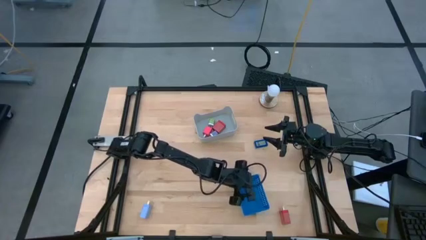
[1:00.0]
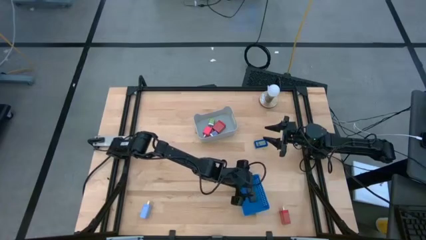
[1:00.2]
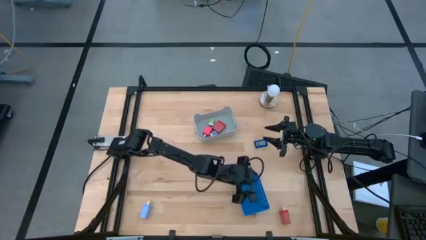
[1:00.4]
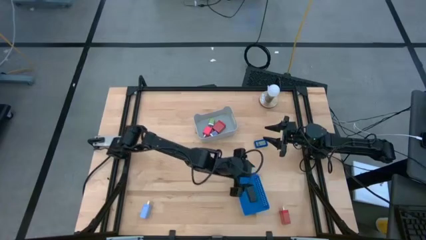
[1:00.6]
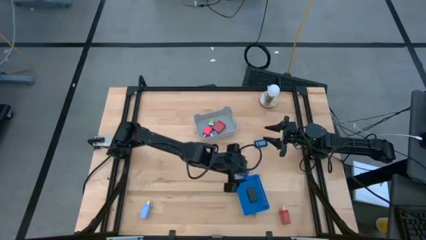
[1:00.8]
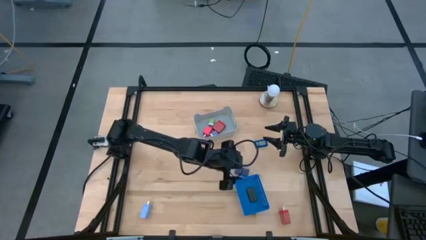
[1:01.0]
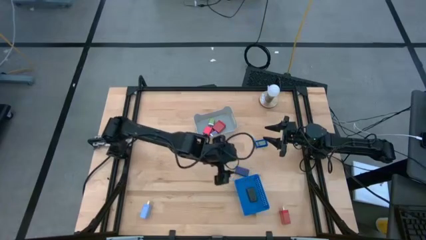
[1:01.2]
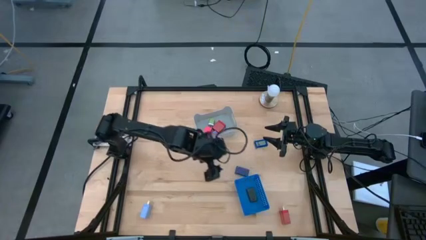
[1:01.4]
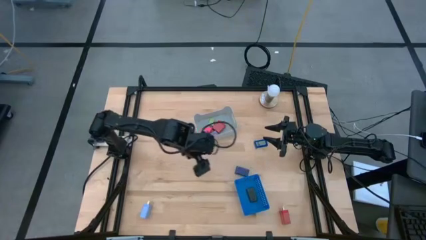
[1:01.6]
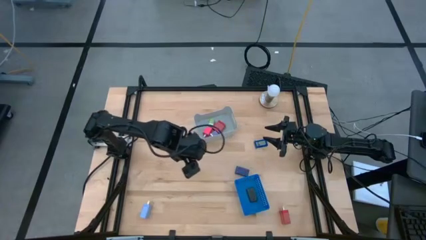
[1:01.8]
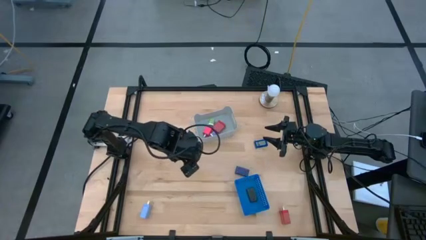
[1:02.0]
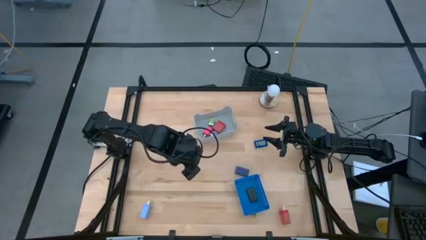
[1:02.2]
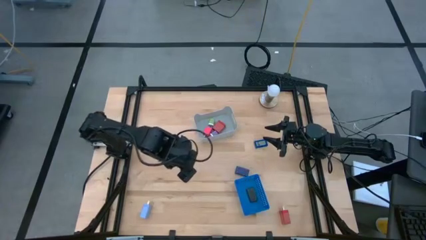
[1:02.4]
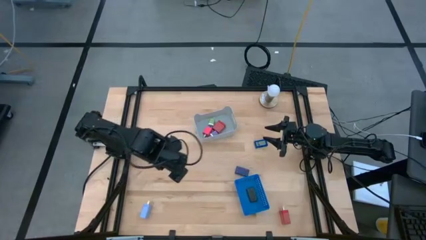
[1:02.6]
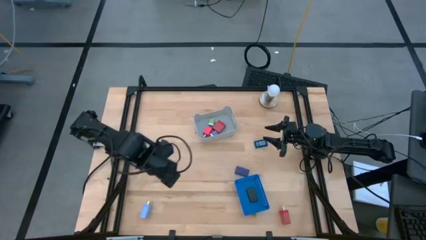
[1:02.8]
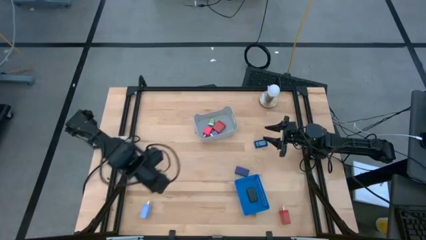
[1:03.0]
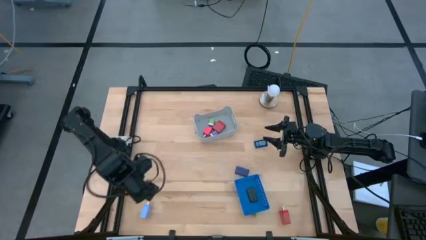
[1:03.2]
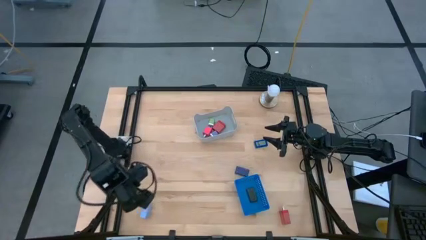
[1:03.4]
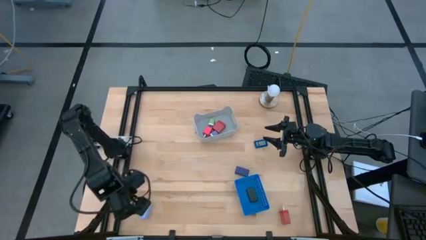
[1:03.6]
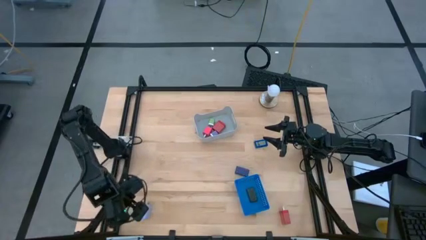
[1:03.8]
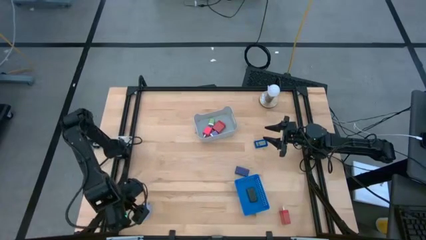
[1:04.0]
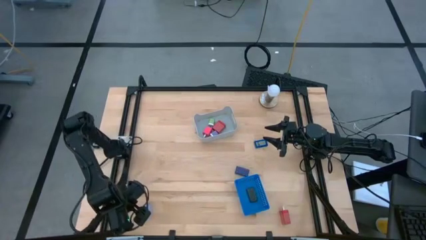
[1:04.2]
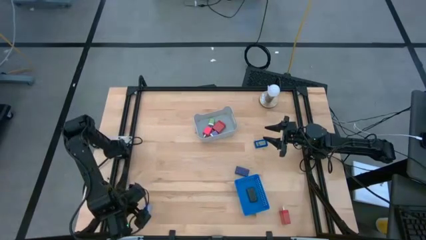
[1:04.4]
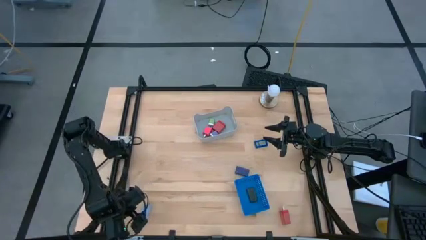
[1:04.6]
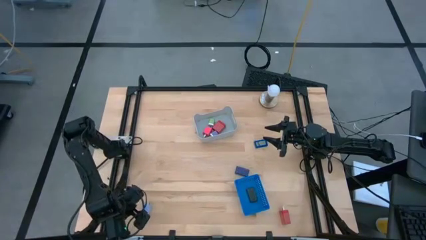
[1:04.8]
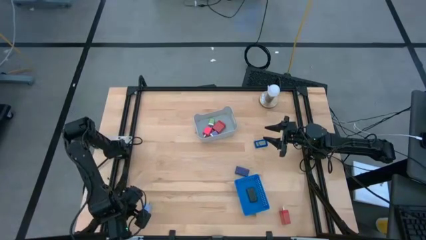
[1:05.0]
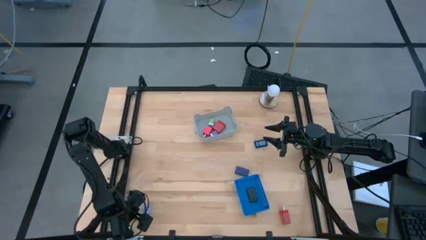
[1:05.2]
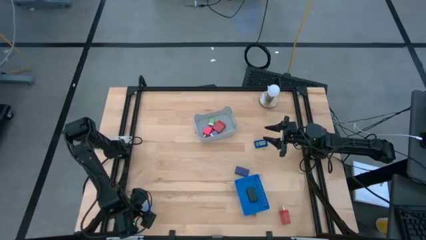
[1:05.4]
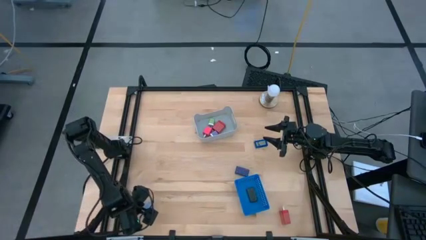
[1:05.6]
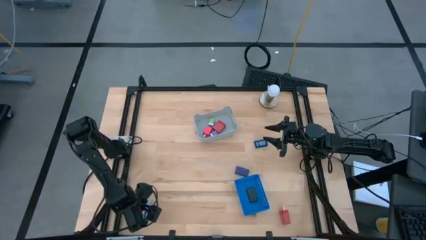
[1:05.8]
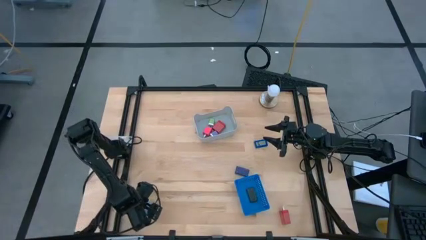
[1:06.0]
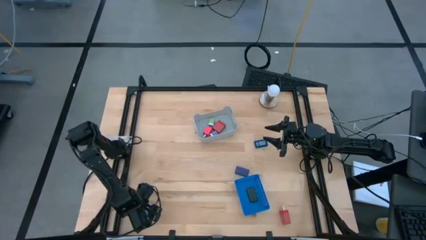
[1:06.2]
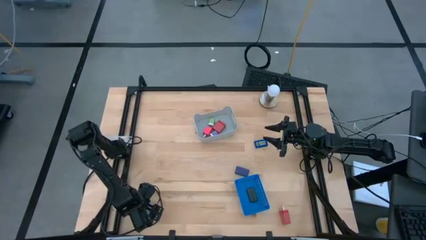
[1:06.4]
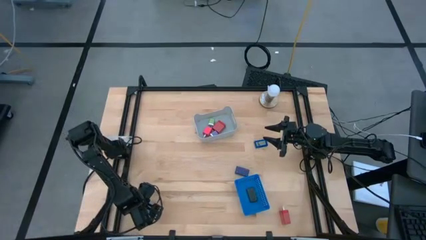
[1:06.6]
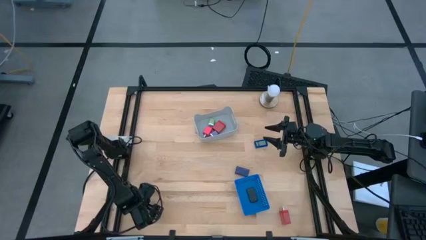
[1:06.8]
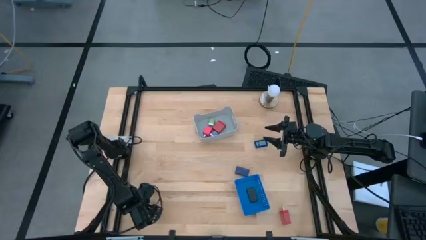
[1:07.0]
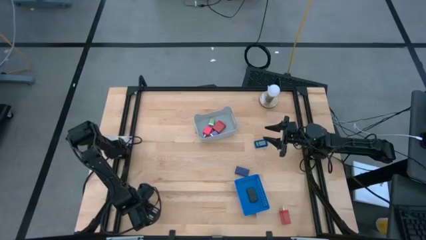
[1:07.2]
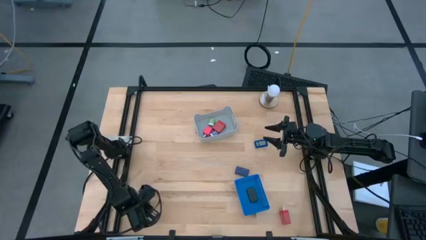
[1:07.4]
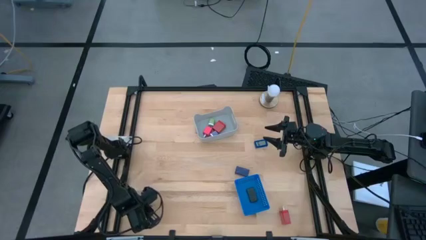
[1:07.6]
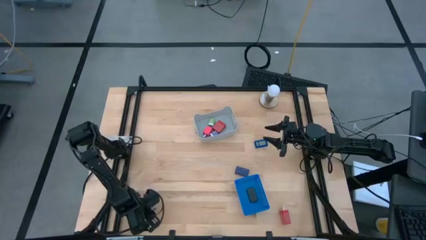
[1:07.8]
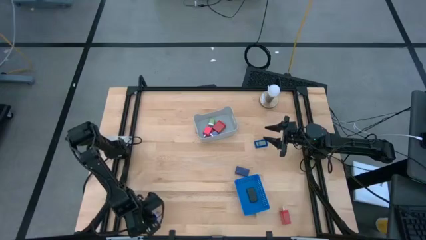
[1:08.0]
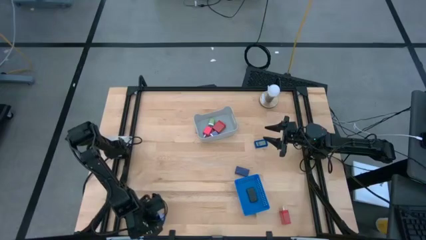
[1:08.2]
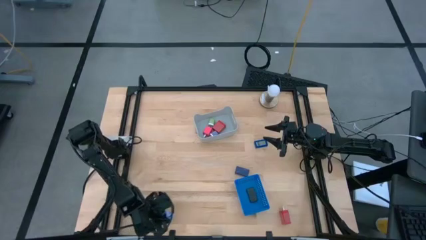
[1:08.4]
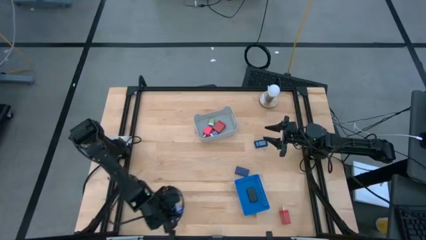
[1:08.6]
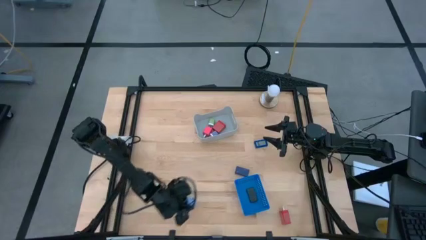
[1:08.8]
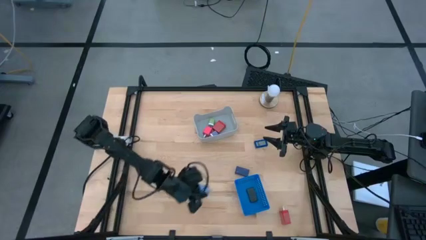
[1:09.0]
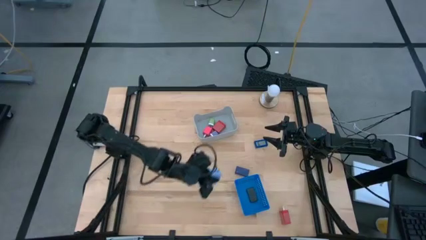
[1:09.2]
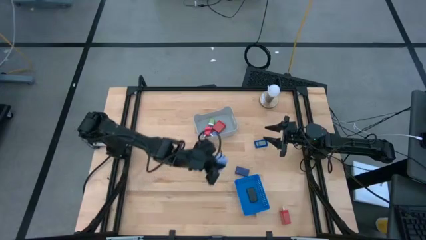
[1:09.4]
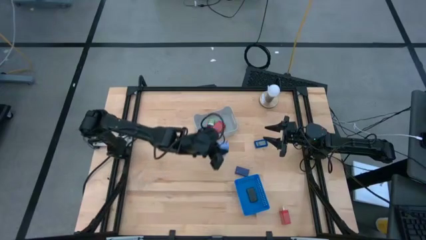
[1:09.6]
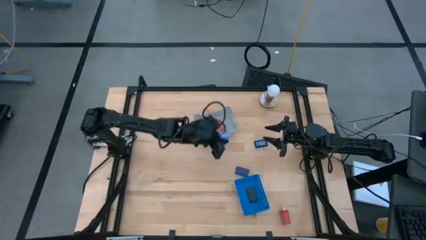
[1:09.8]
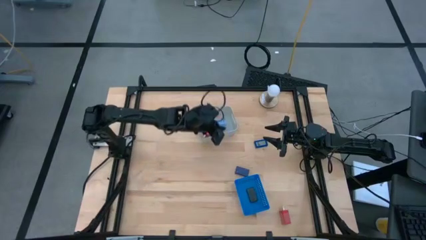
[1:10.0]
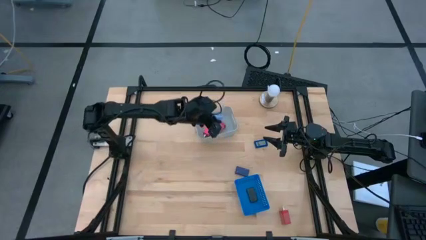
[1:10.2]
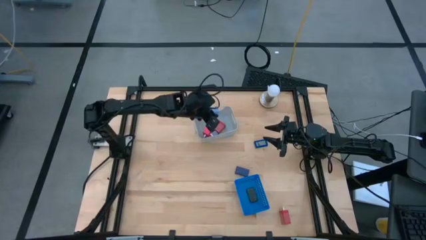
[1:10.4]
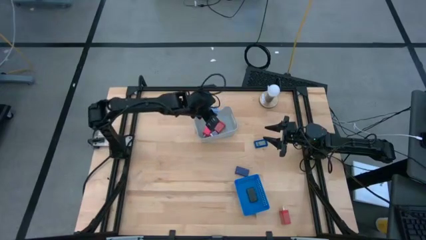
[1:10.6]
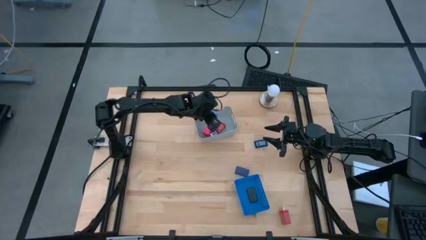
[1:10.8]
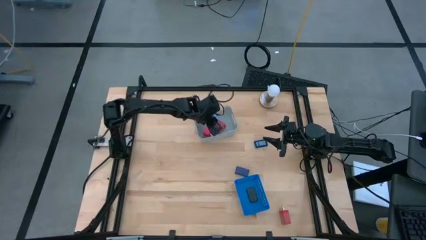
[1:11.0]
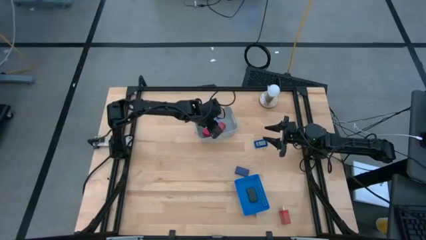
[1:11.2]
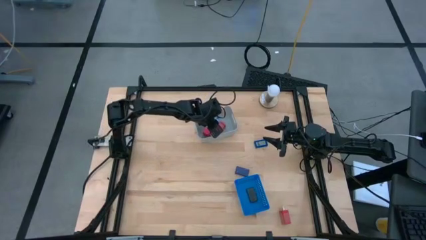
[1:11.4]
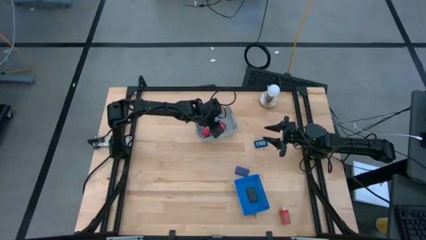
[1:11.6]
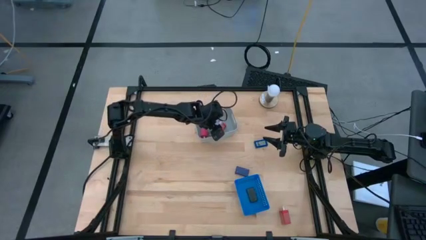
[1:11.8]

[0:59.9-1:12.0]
Task: Pick & Place Office items
Put the blue charger adapter into the gray bin
